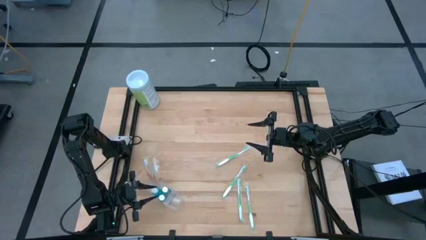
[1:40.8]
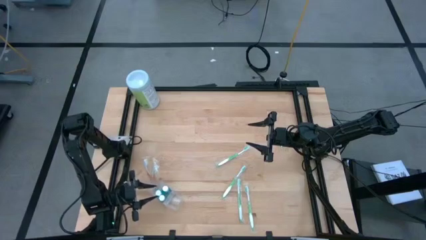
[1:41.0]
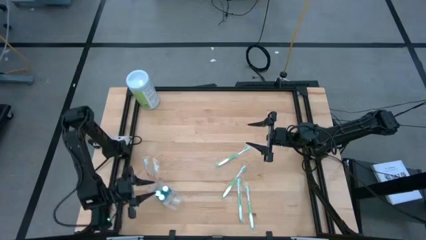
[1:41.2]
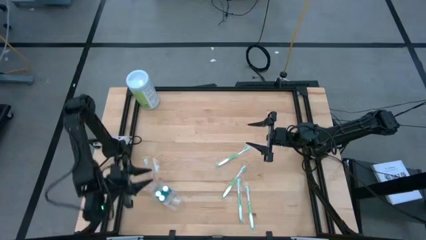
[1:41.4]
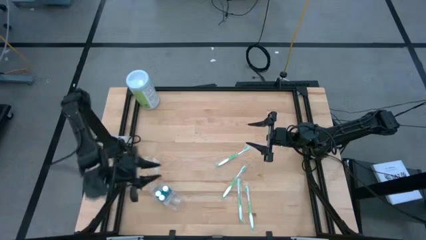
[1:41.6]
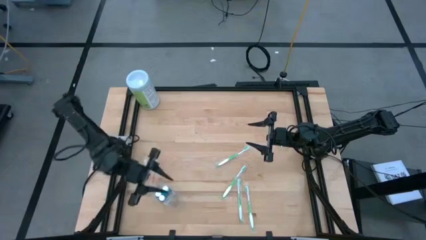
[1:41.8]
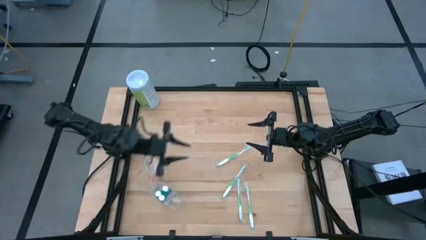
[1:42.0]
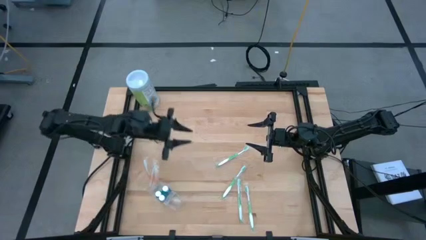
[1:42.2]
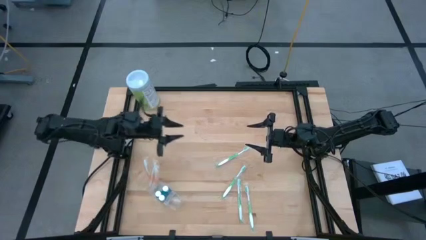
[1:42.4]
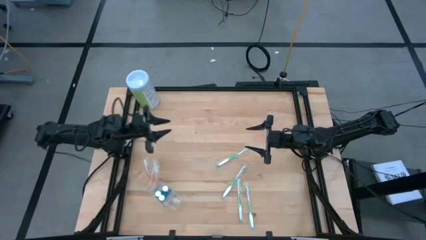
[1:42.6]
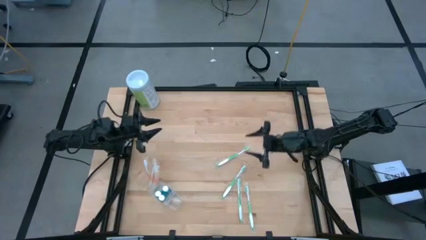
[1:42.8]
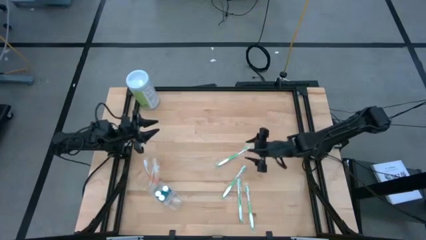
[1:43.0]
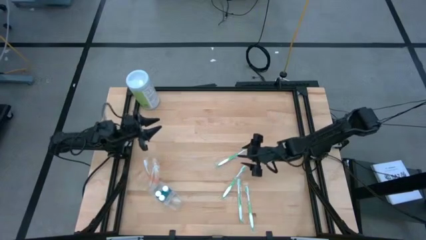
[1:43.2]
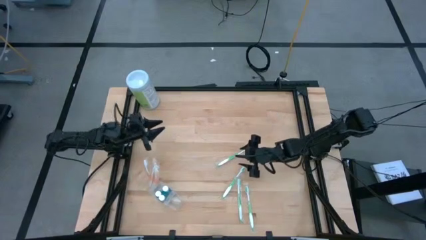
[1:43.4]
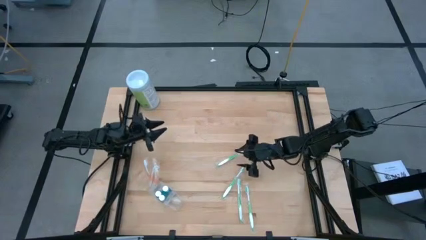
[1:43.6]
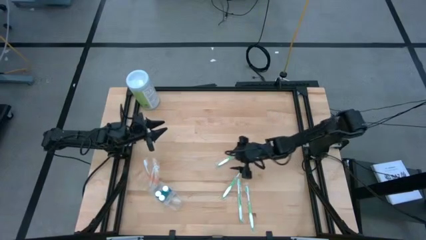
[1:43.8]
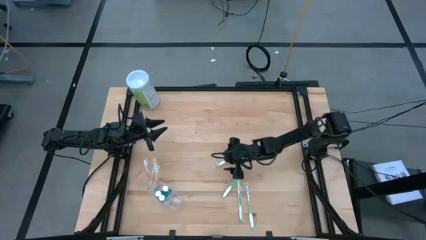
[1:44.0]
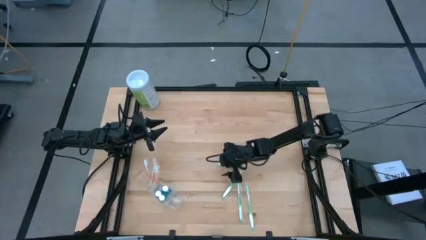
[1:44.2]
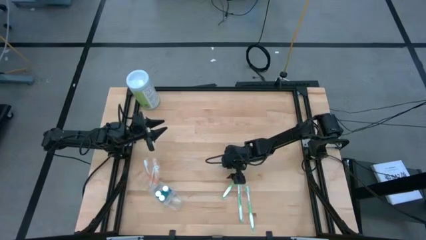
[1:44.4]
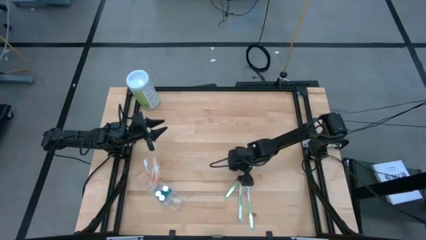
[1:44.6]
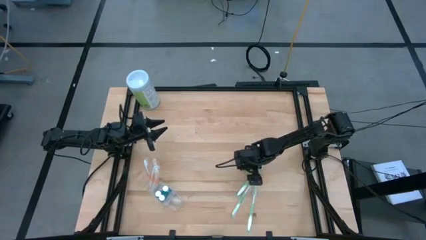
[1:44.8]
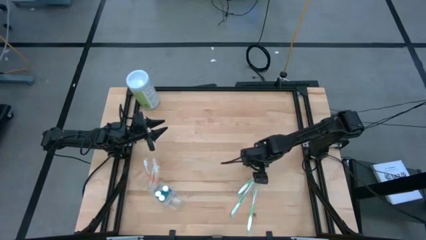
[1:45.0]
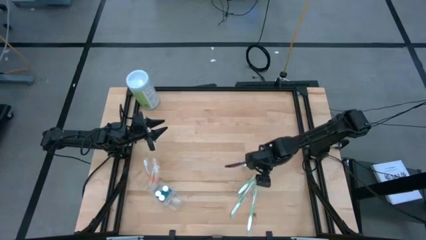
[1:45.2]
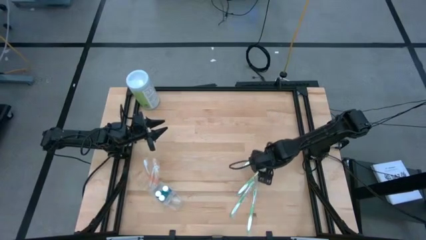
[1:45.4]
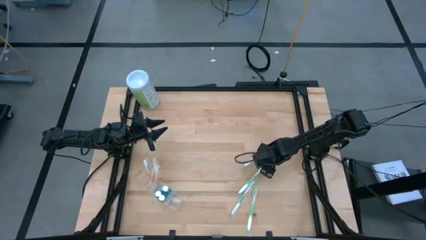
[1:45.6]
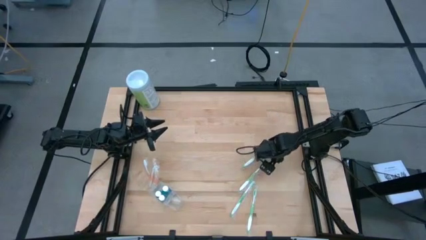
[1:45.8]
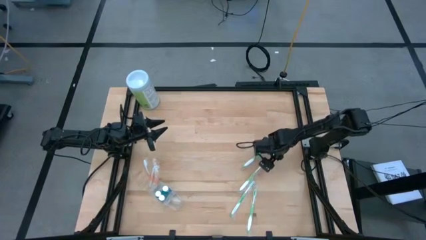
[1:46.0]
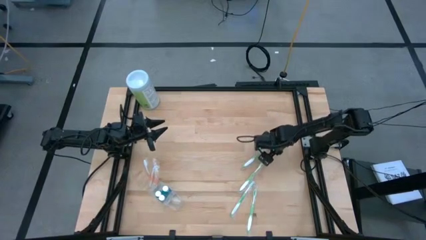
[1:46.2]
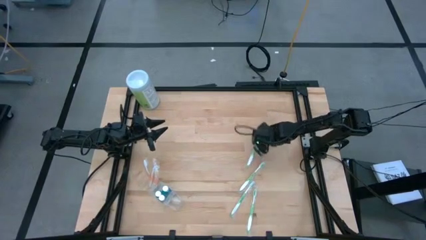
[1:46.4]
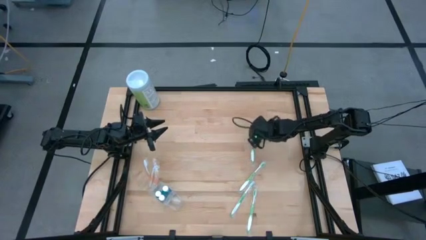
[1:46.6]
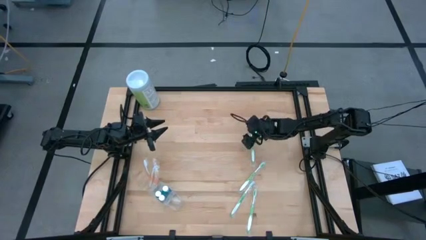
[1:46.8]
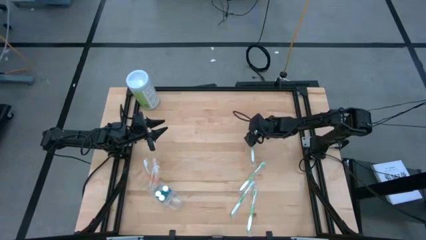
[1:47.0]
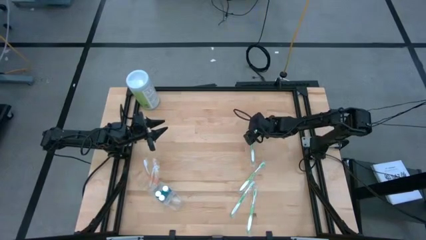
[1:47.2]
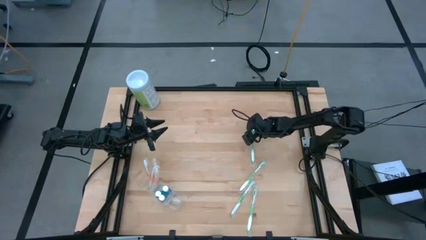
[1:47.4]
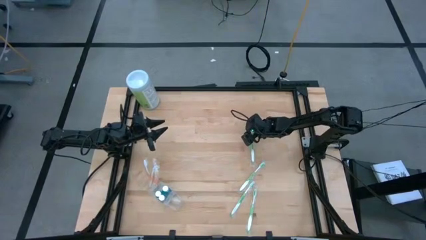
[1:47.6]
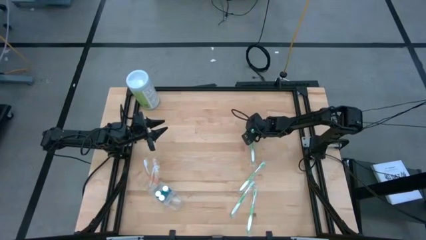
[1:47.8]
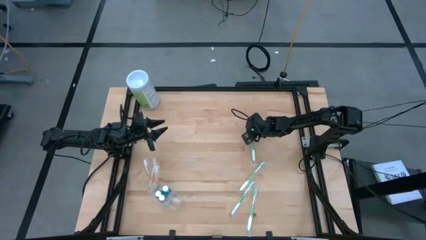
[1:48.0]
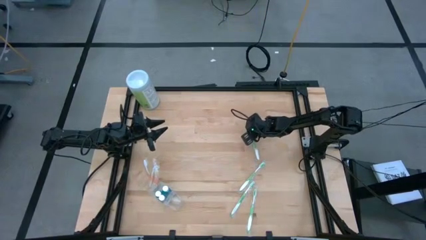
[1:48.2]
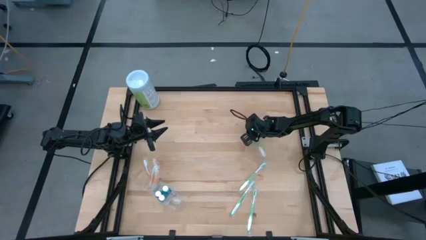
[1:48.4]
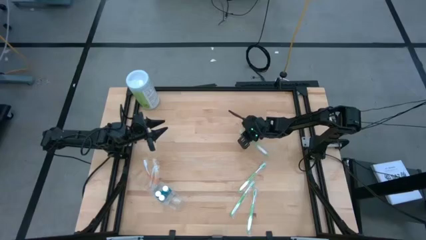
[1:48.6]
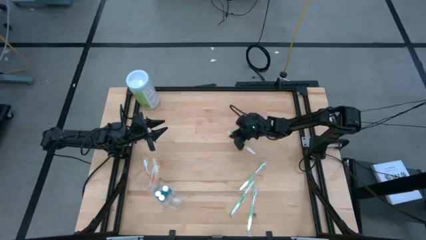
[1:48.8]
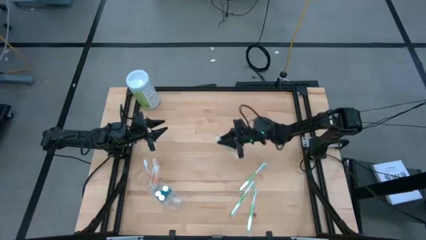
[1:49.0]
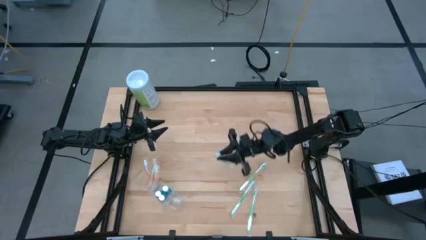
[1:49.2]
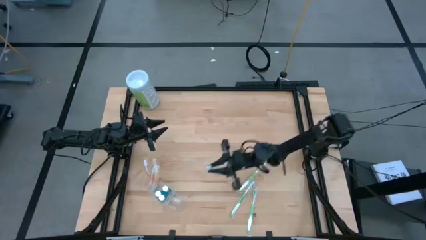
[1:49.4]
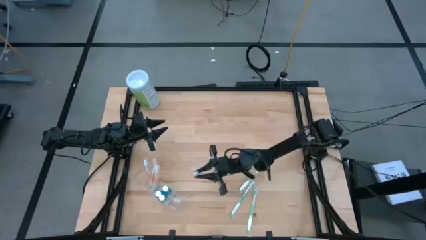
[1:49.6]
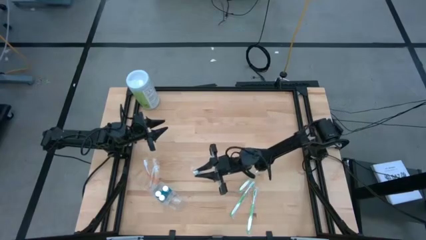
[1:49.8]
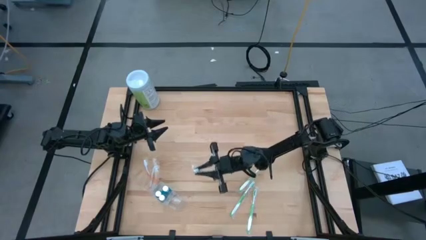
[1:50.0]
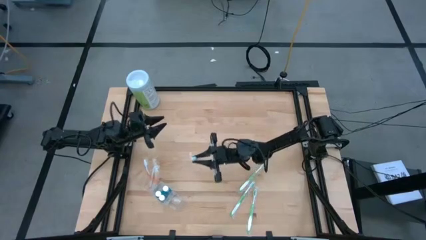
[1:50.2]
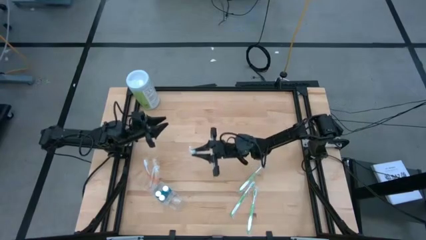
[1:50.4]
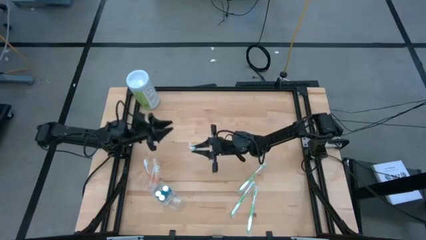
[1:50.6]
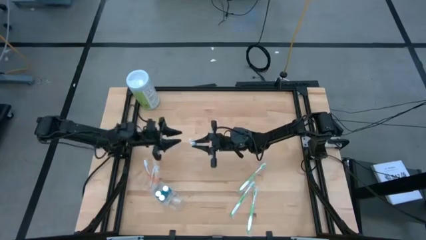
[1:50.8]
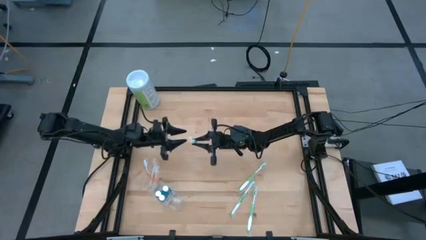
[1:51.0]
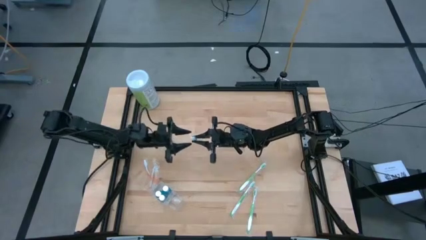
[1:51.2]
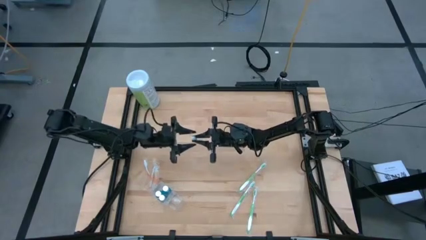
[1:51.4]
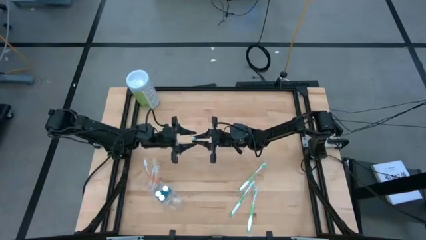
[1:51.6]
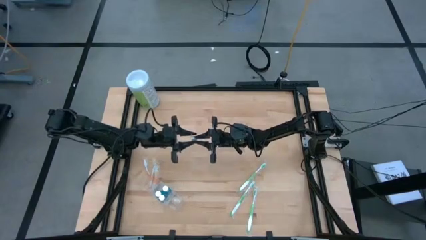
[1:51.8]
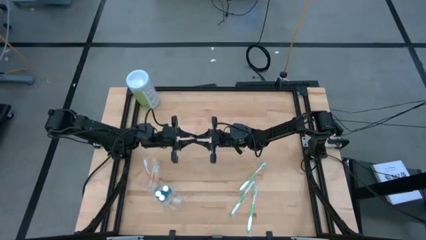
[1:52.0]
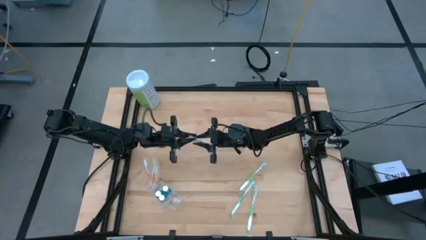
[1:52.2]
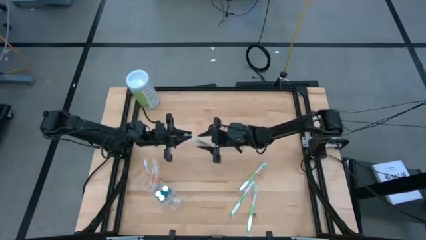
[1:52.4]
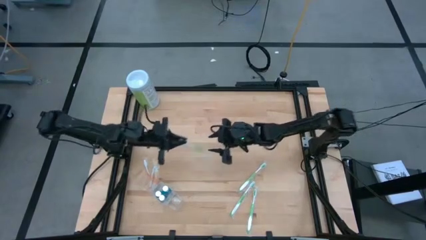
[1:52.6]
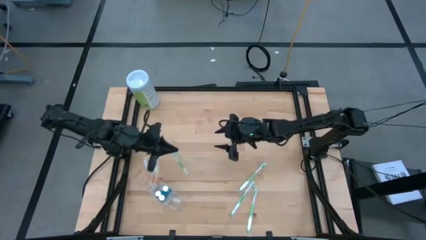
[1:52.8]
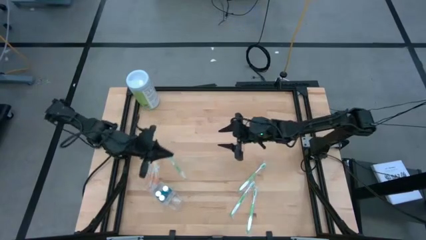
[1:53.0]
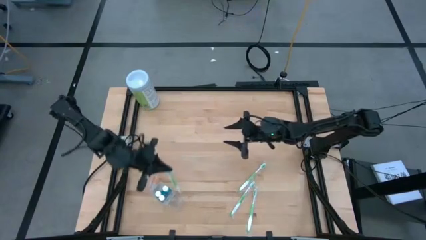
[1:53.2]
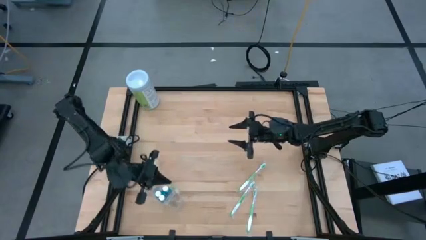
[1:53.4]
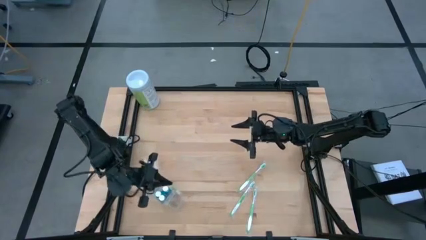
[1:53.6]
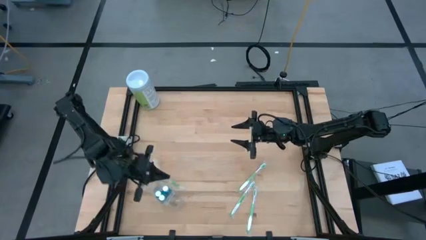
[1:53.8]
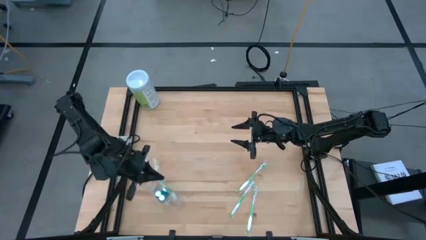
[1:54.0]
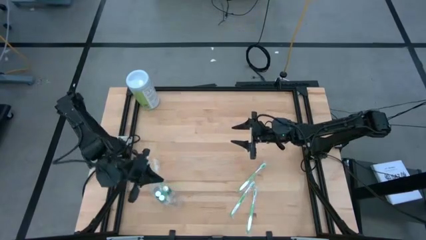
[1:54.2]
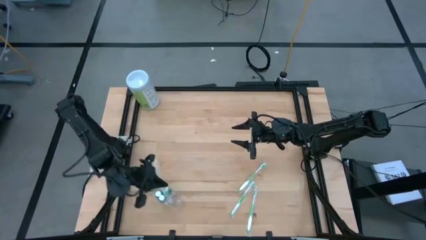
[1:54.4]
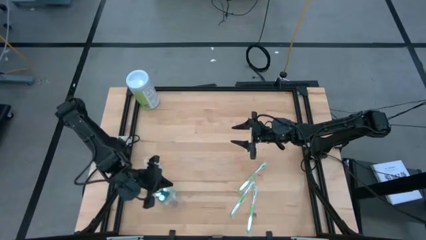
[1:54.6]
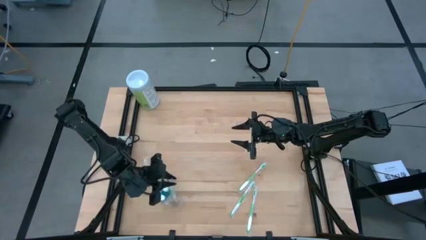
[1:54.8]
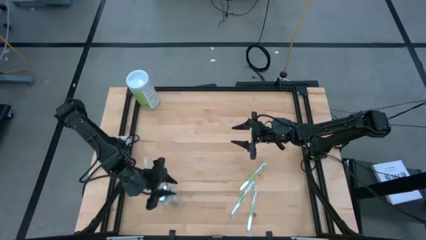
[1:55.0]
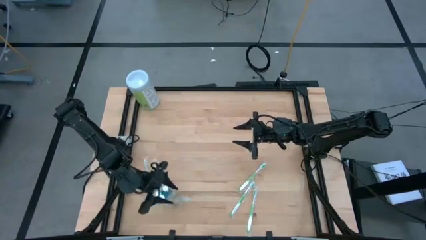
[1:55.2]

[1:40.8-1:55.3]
Task: Pick & Place toothbrushing station
Put the green toothbrush into the transparent organizer

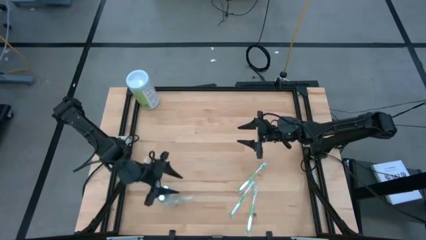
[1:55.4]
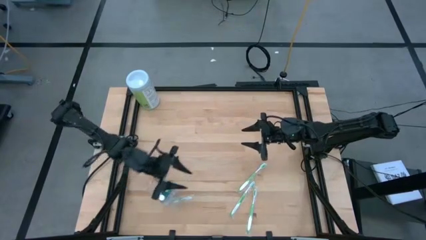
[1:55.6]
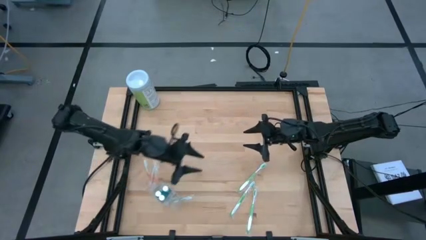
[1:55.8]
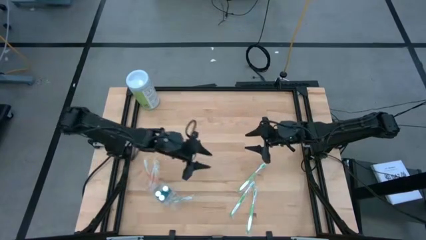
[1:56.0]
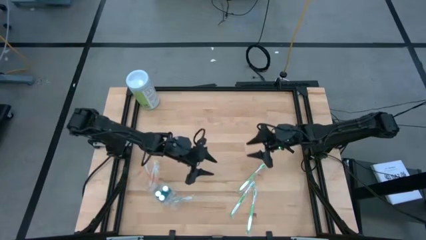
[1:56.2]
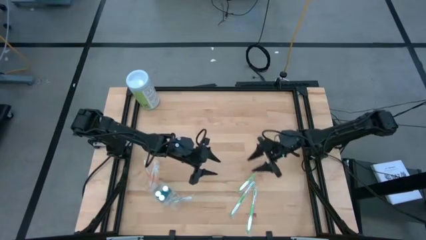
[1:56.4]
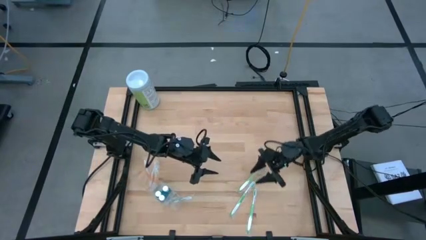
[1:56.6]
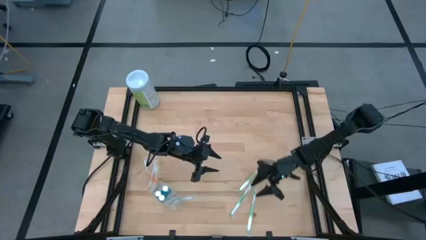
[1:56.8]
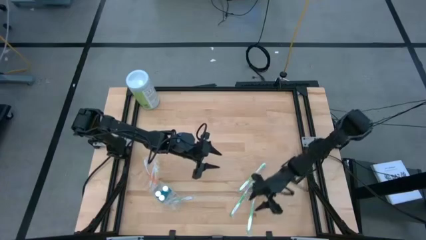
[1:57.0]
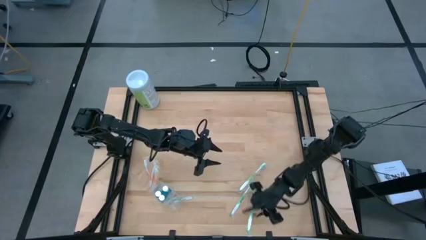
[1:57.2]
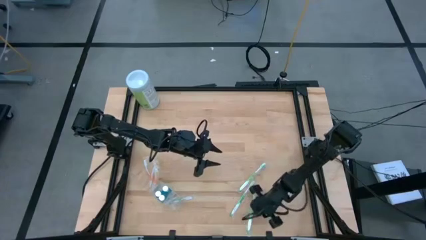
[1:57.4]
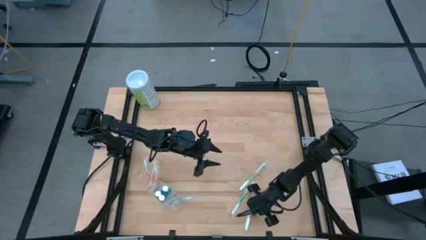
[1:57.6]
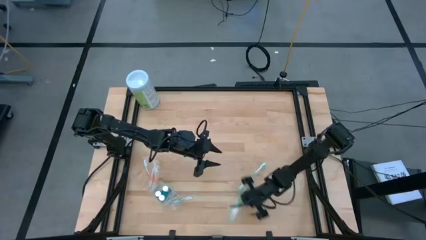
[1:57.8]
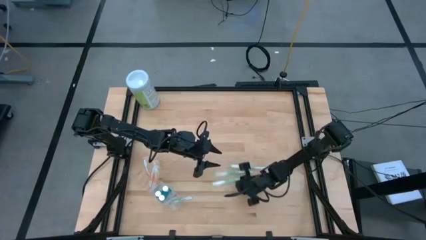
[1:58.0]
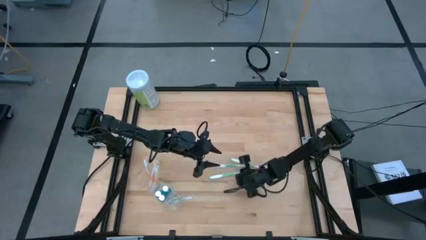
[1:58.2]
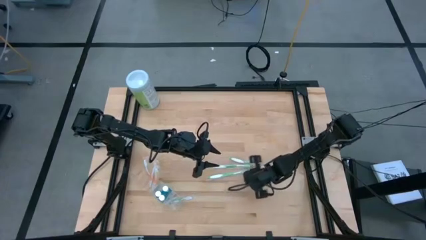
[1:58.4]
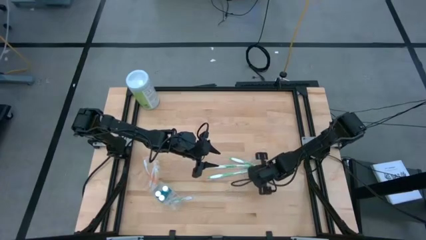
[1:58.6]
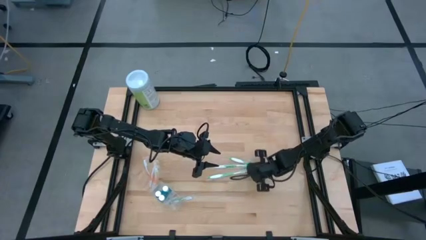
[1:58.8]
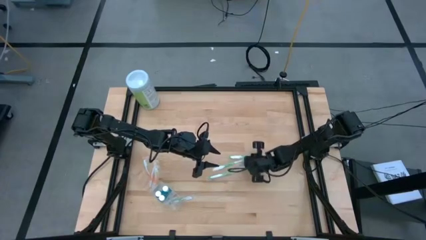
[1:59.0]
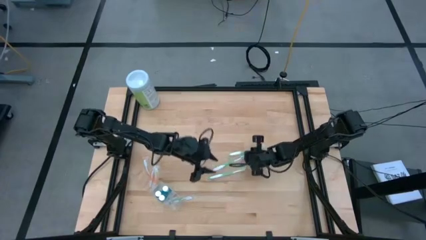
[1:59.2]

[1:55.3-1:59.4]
Adjust the green toothbrushes
